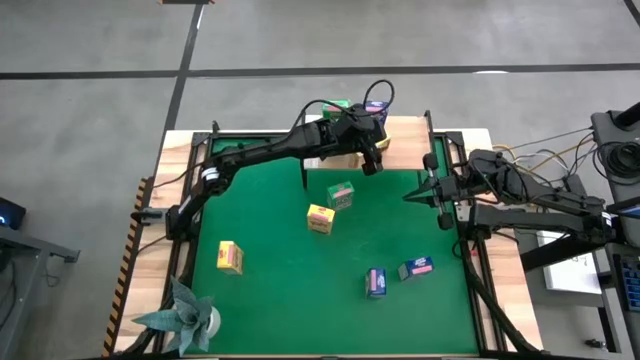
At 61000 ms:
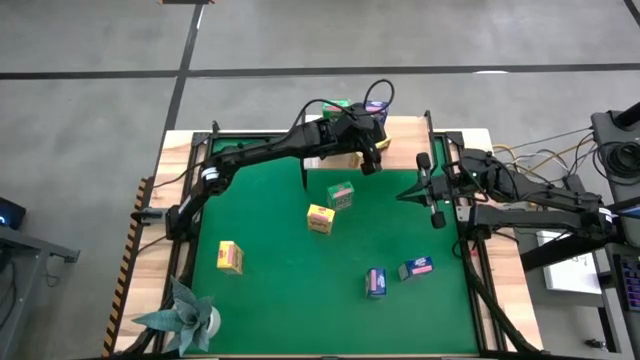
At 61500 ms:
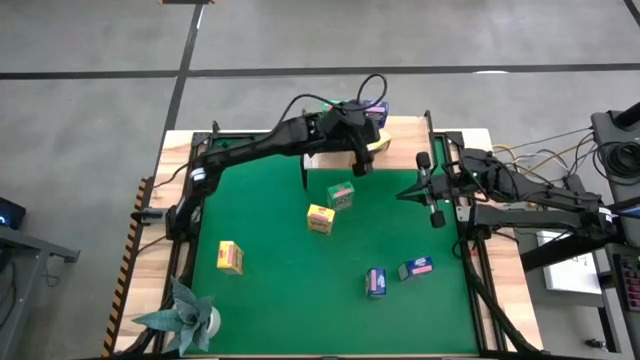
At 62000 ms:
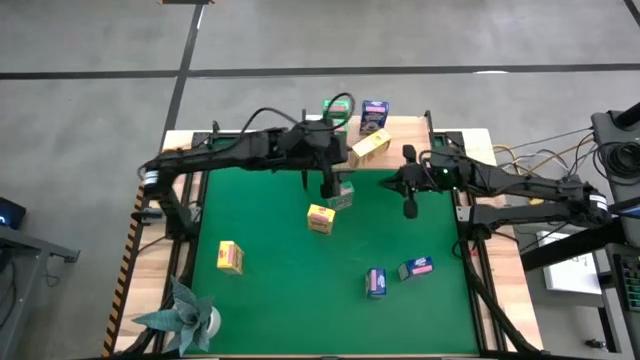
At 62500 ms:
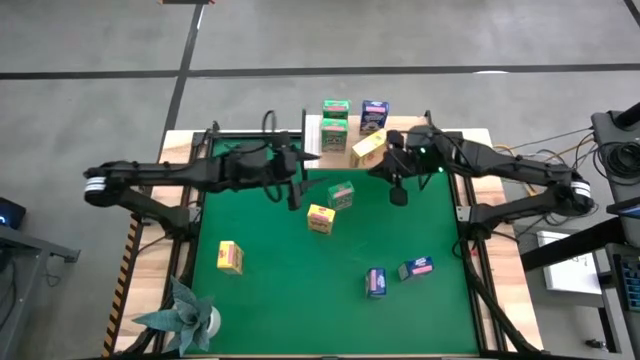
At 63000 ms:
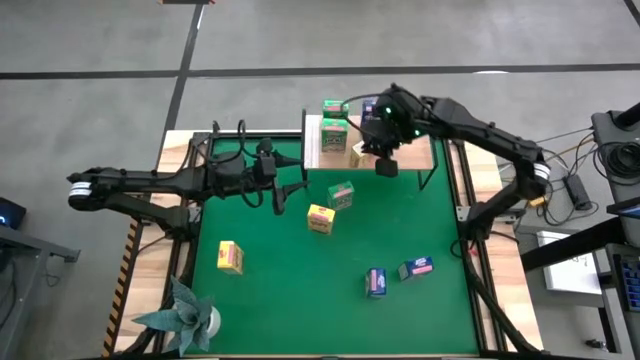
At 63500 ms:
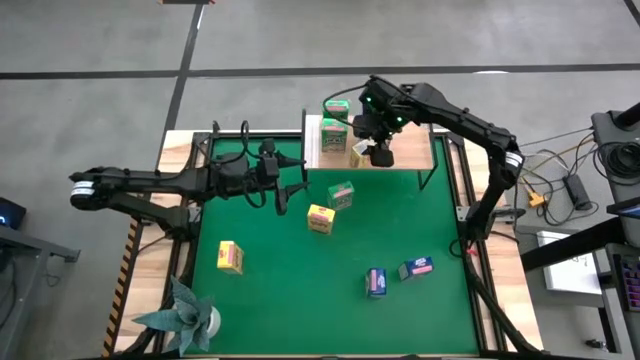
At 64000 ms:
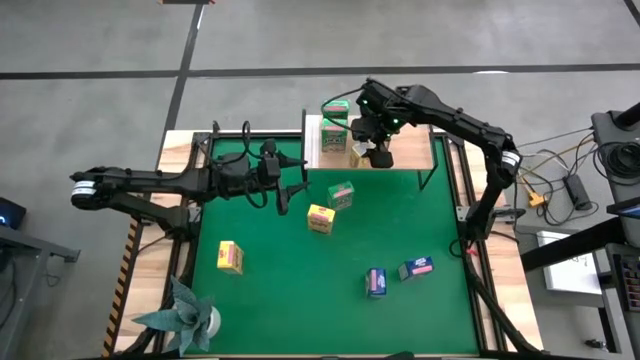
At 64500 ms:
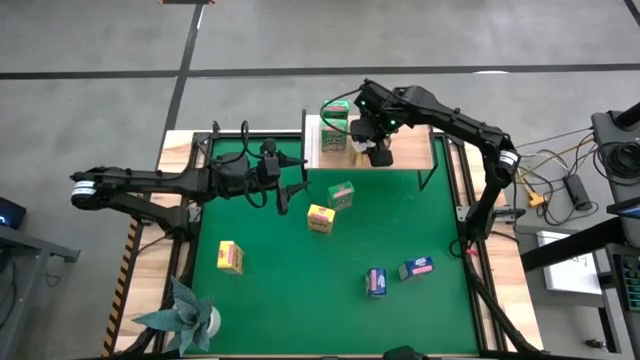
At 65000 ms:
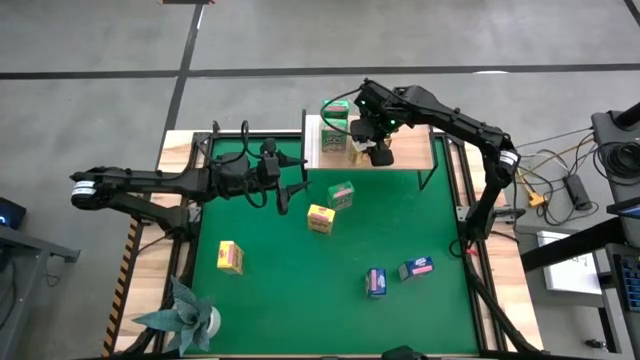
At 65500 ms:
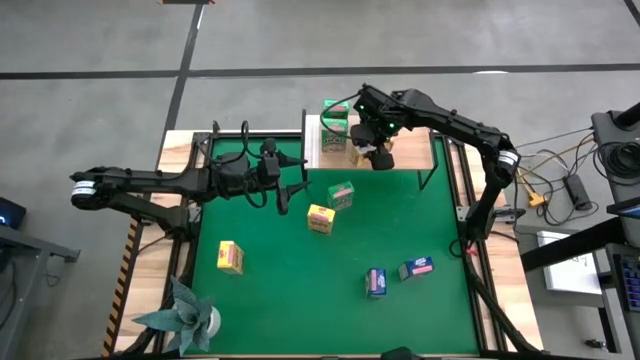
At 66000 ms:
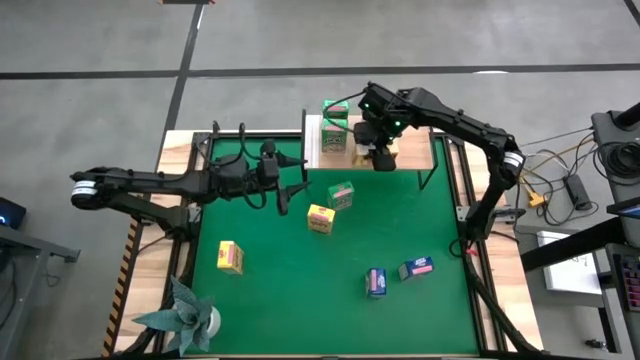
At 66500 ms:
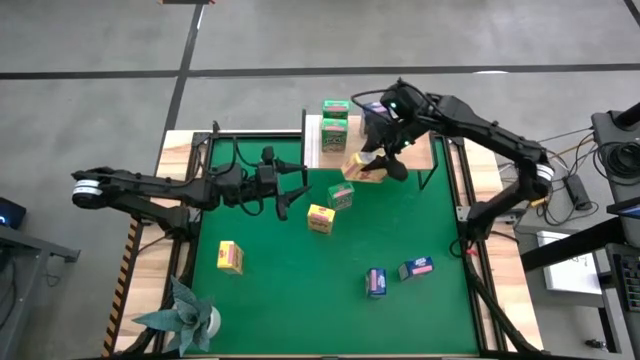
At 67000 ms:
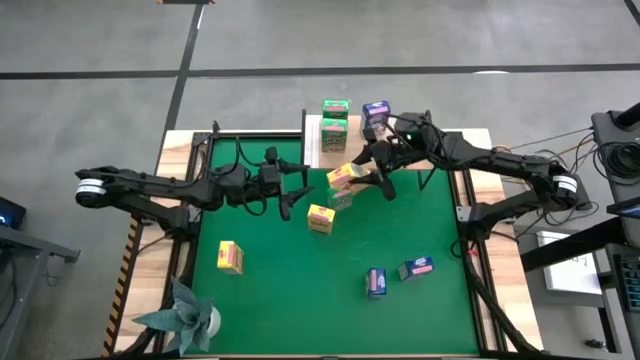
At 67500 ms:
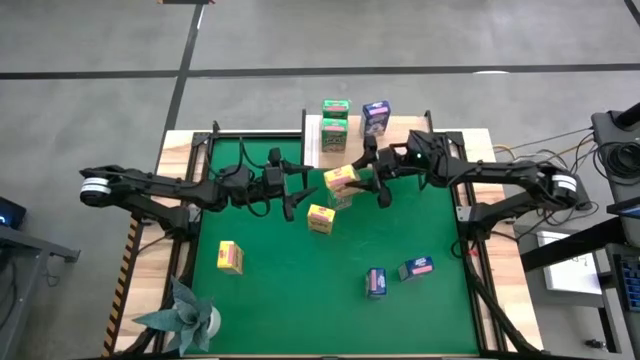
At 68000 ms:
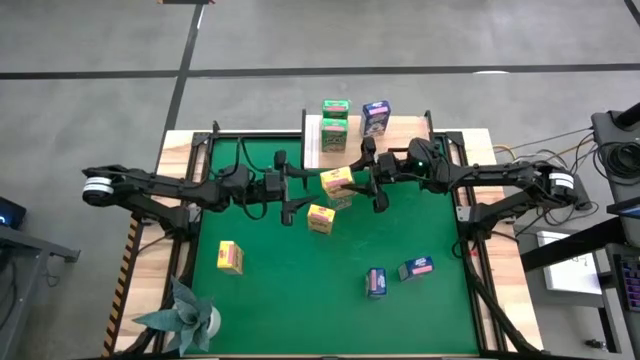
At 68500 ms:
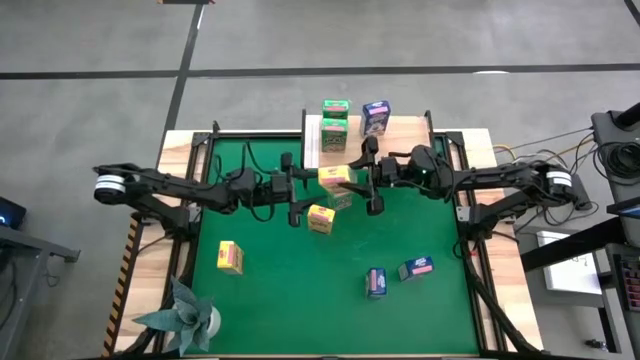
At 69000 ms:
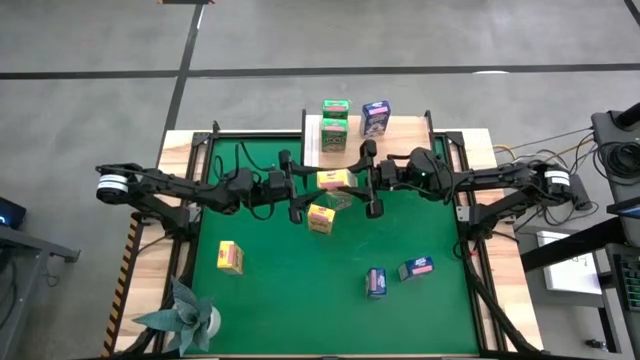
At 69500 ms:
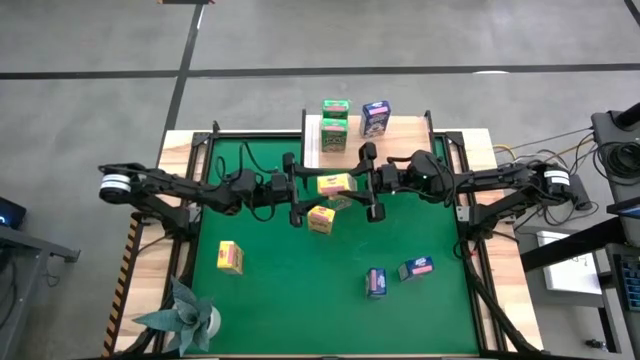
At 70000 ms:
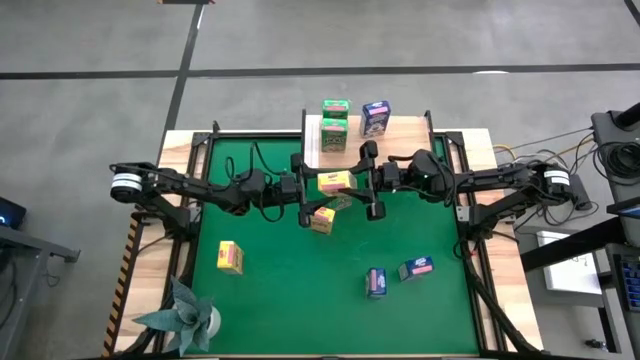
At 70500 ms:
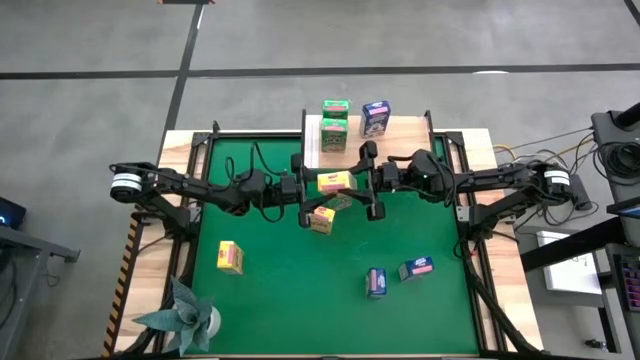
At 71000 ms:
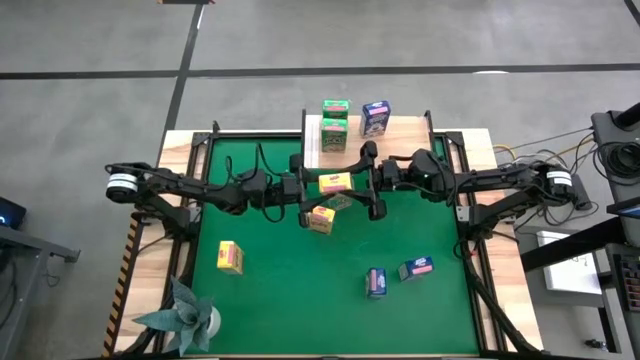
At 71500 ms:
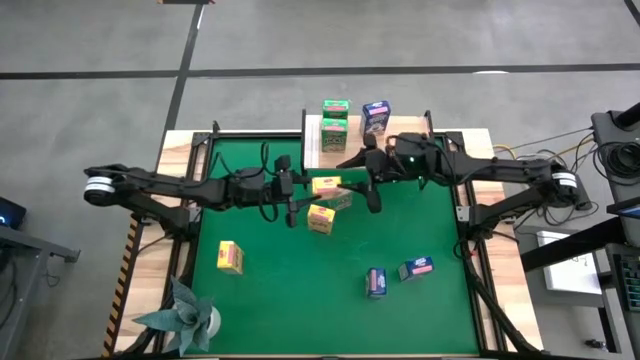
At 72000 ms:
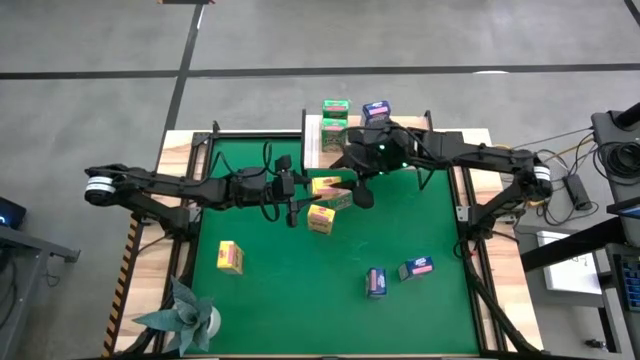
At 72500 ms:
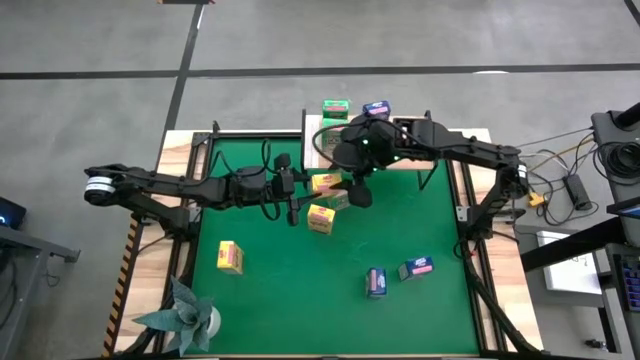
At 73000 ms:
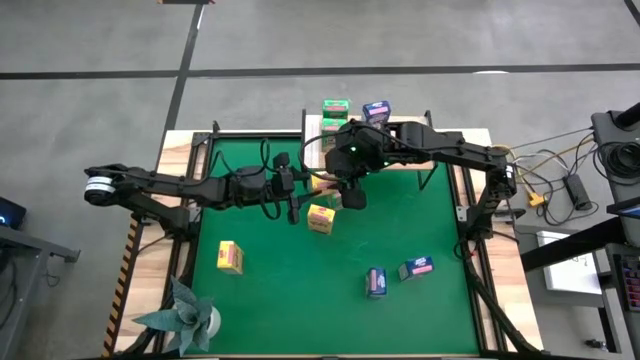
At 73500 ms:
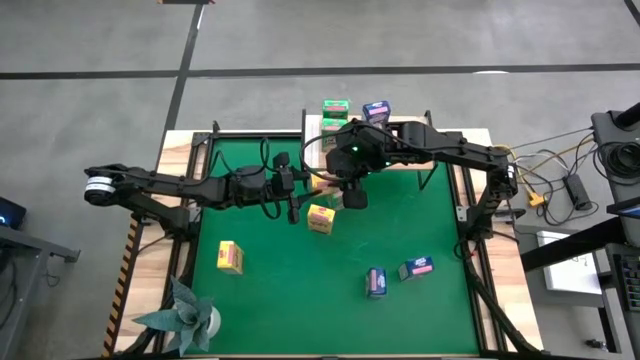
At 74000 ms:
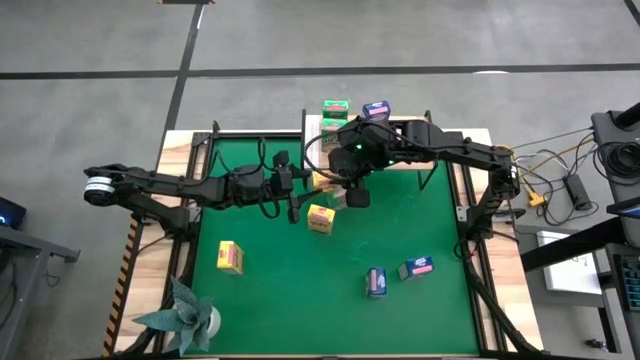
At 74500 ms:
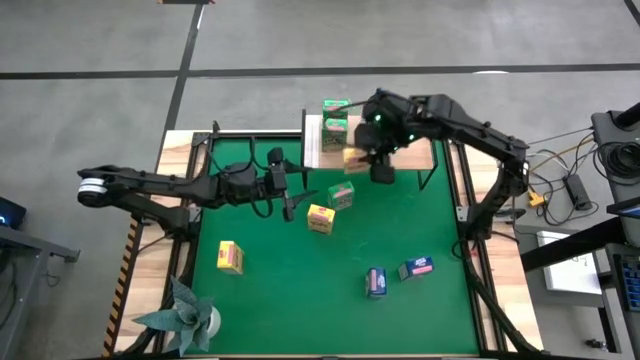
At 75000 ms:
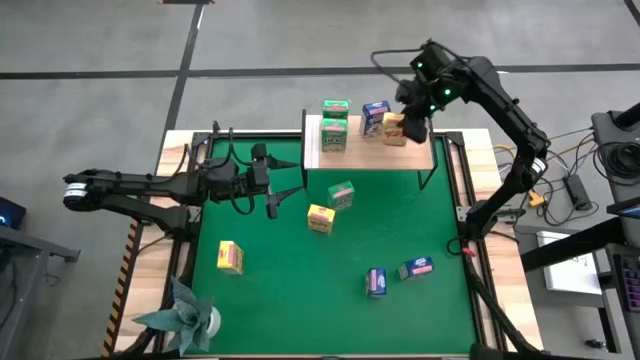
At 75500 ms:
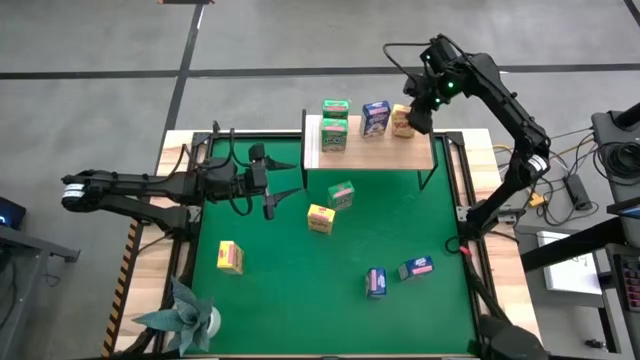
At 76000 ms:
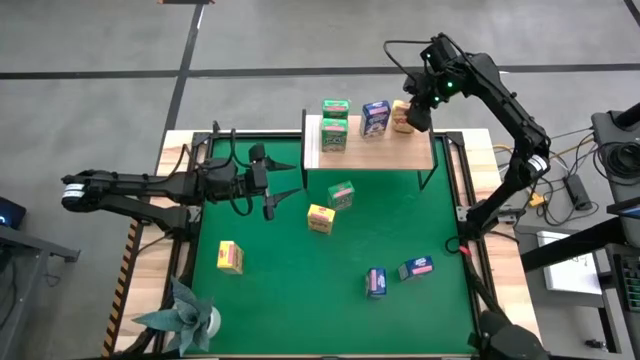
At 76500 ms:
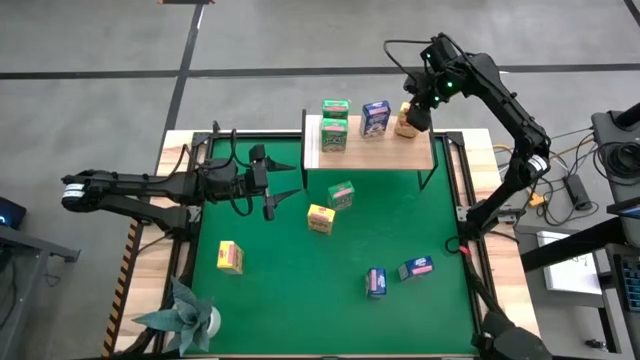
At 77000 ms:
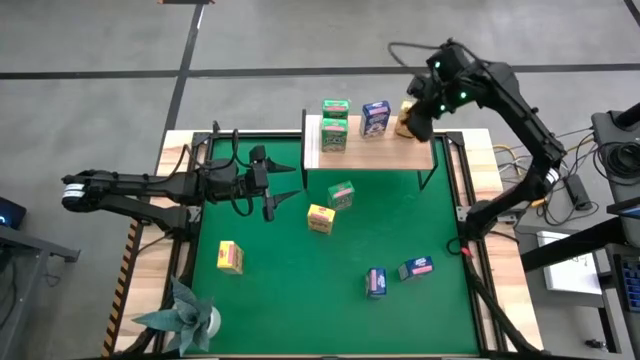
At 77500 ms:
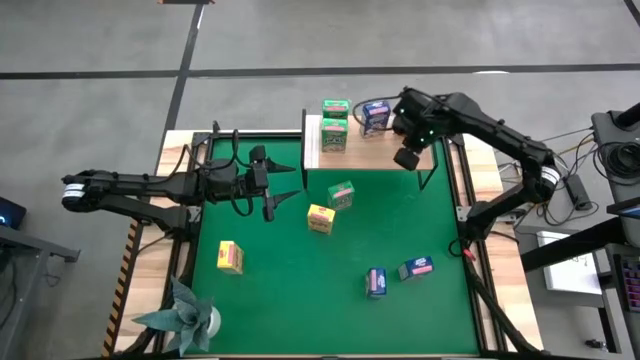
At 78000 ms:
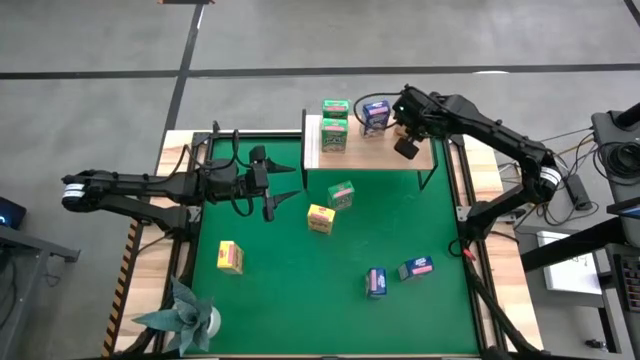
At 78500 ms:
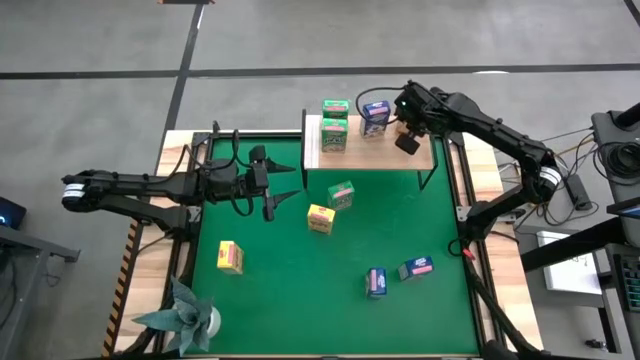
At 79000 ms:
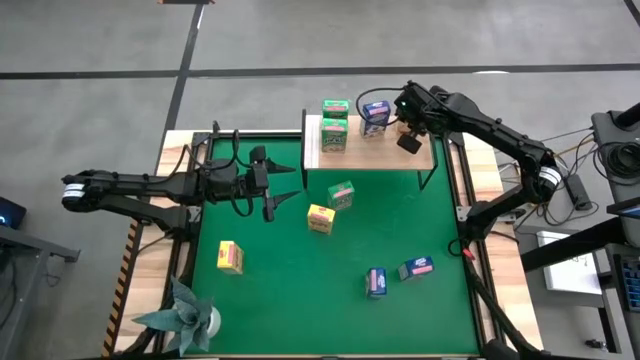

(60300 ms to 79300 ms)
Task: Stack cereal on shelf
Put the center yellow cereal on the shelf

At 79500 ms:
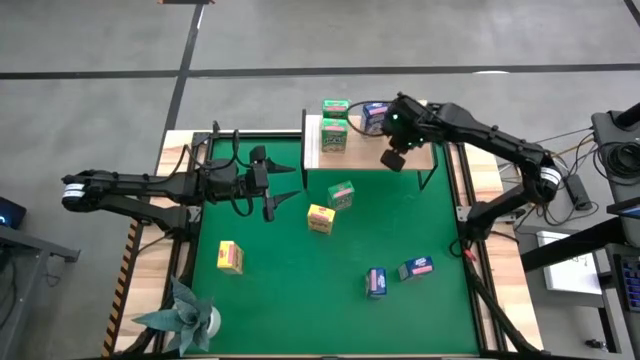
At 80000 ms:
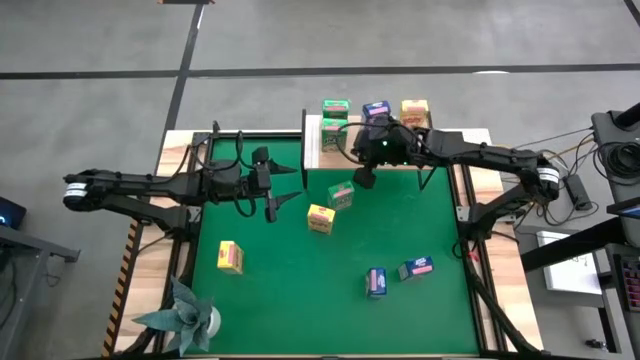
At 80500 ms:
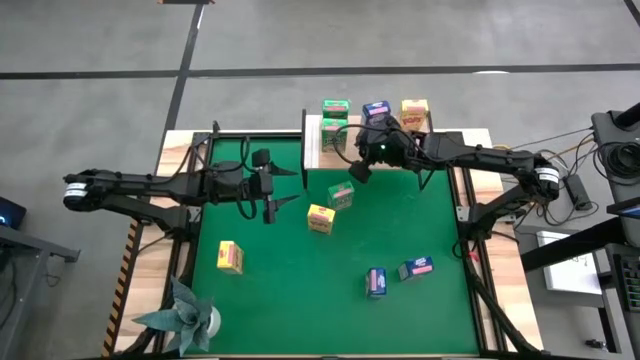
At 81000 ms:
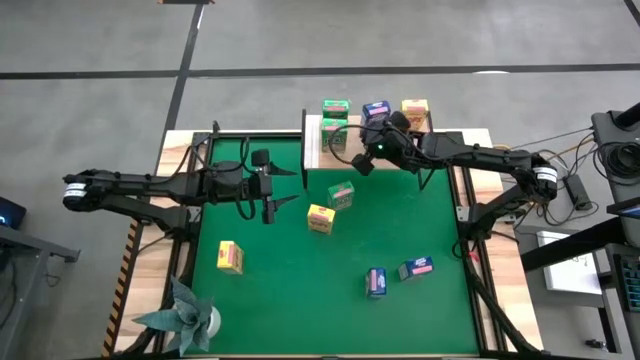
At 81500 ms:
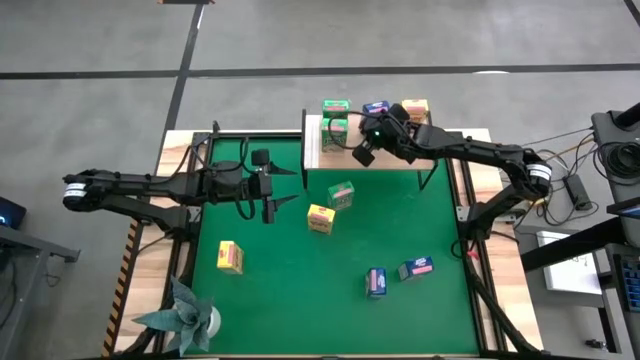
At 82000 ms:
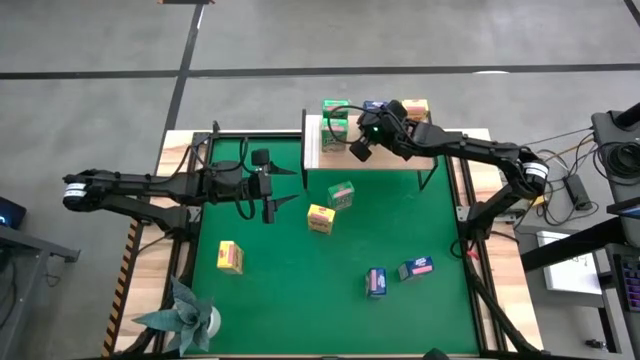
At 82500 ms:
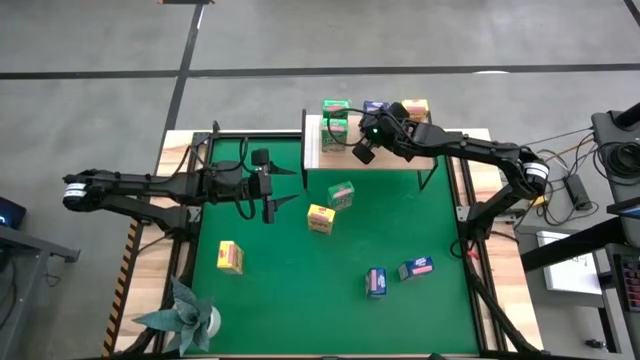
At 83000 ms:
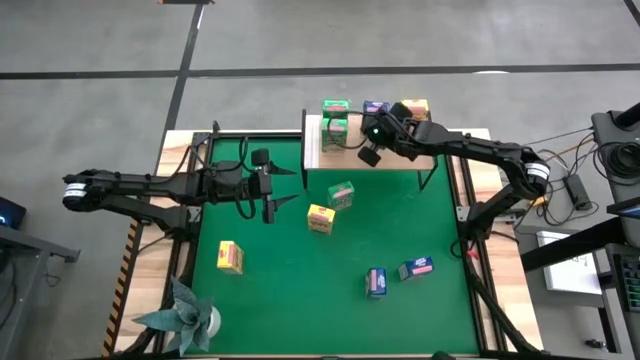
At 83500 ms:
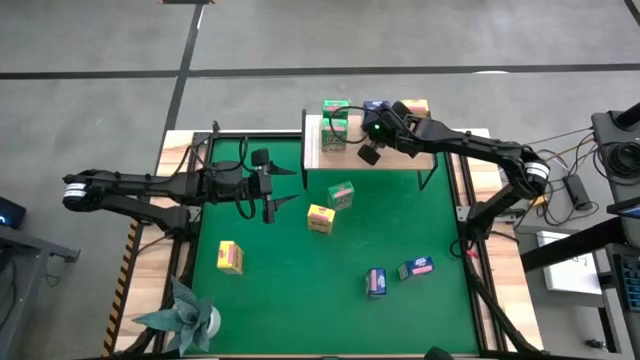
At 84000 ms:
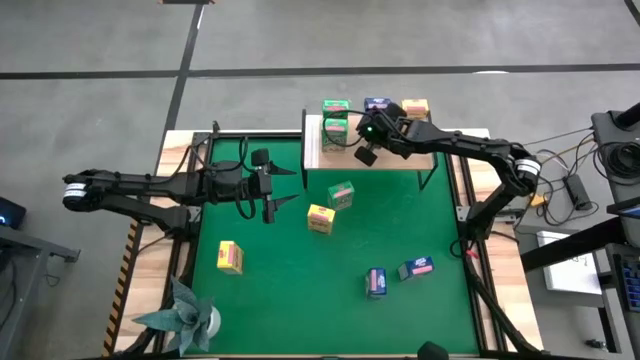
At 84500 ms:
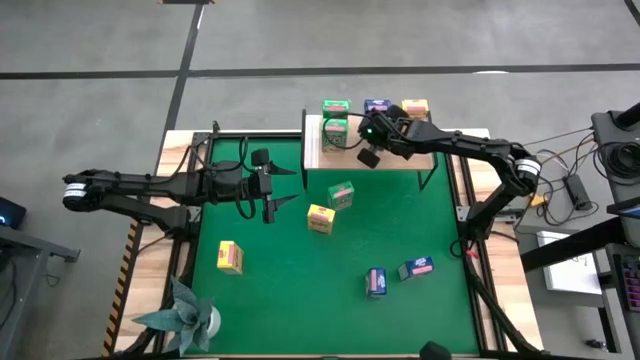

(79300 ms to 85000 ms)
Adjust the blue cereal box
